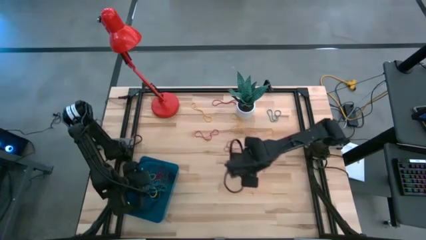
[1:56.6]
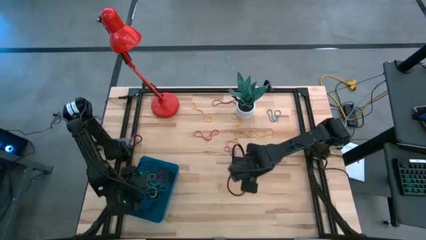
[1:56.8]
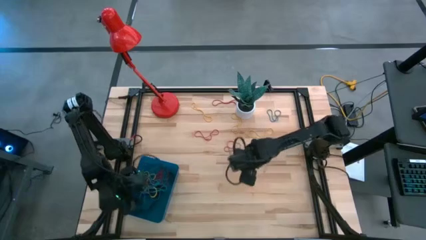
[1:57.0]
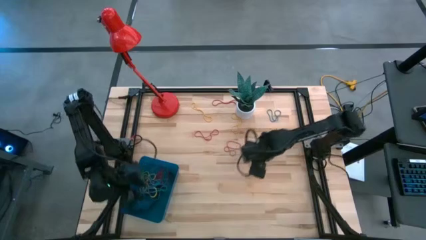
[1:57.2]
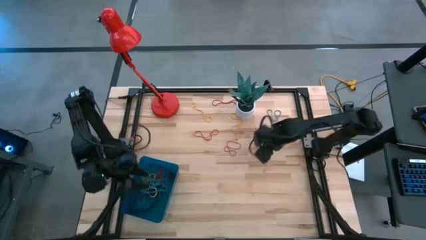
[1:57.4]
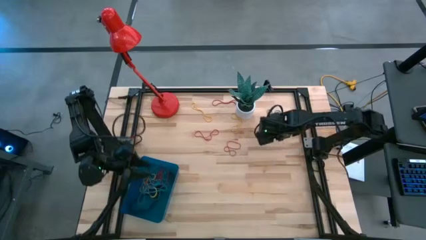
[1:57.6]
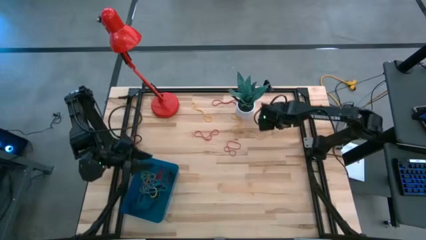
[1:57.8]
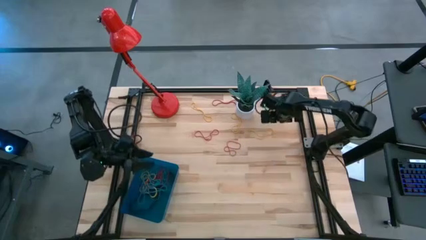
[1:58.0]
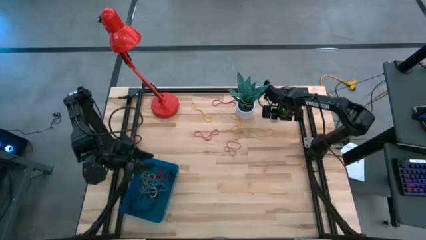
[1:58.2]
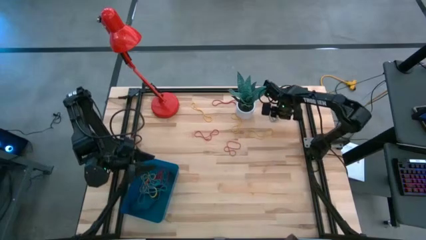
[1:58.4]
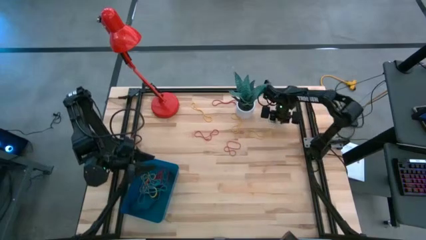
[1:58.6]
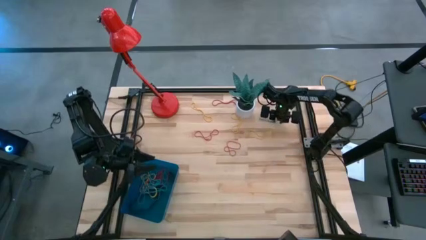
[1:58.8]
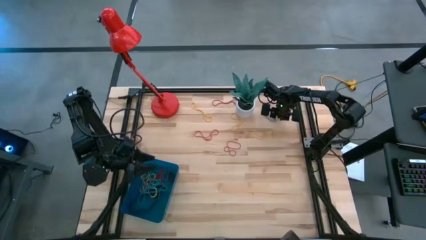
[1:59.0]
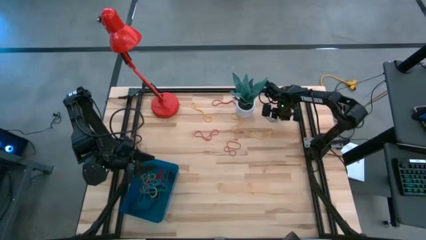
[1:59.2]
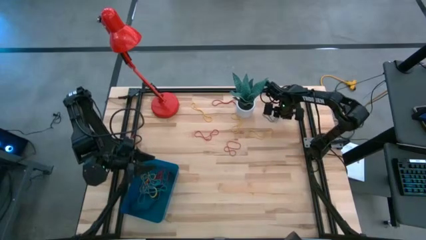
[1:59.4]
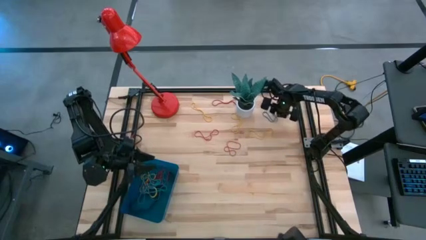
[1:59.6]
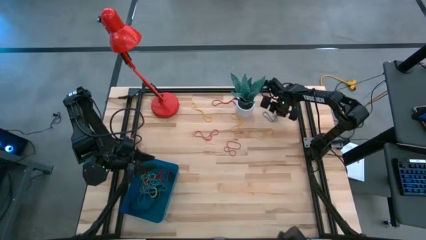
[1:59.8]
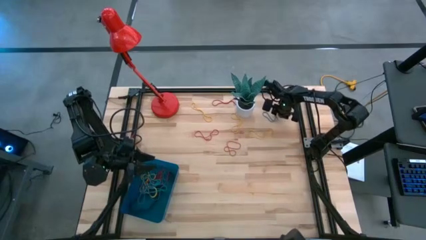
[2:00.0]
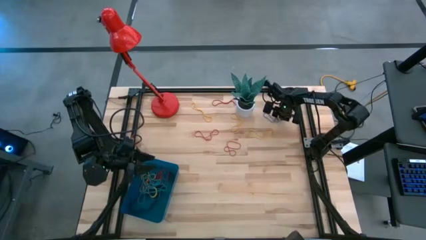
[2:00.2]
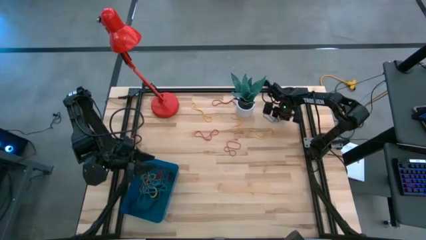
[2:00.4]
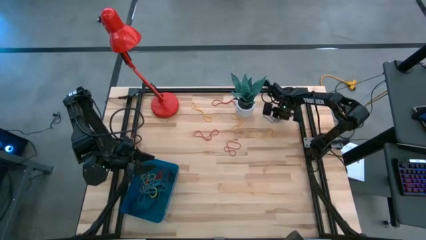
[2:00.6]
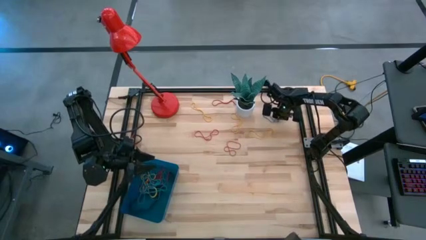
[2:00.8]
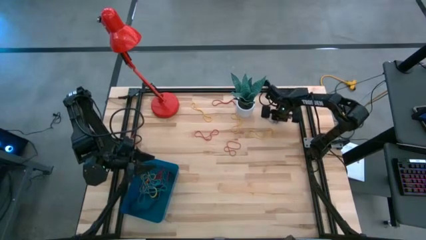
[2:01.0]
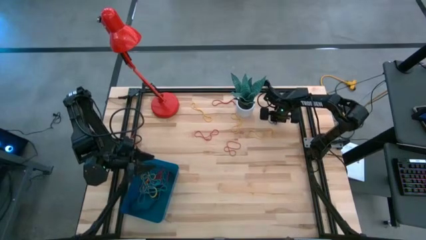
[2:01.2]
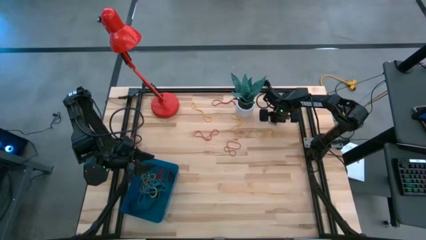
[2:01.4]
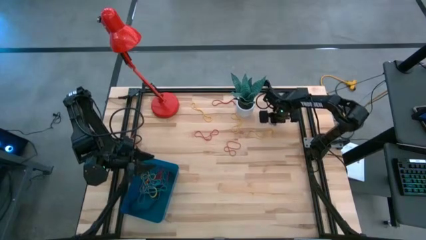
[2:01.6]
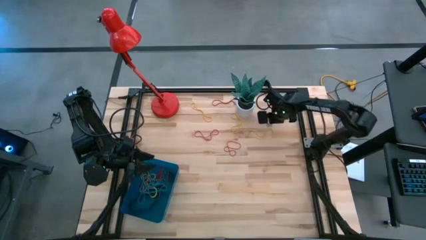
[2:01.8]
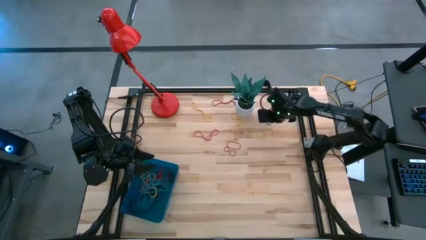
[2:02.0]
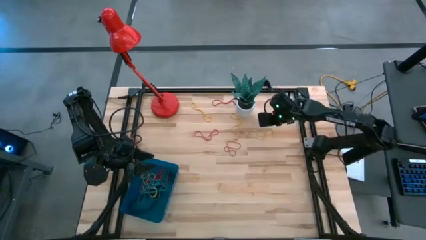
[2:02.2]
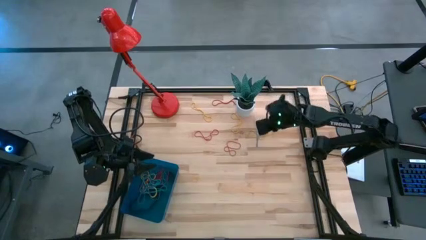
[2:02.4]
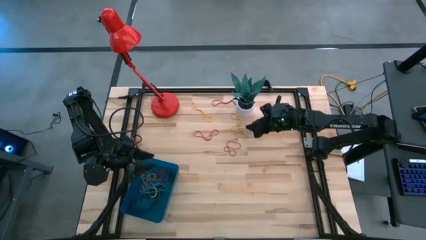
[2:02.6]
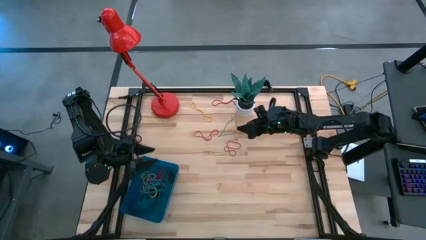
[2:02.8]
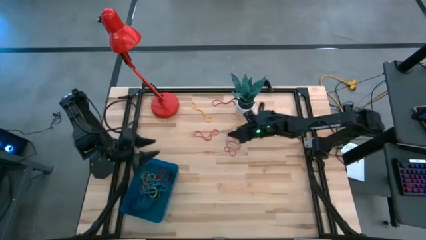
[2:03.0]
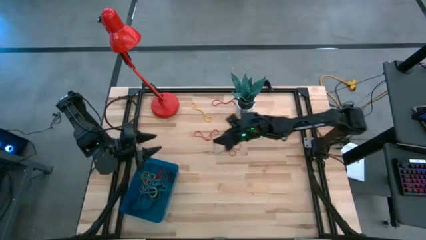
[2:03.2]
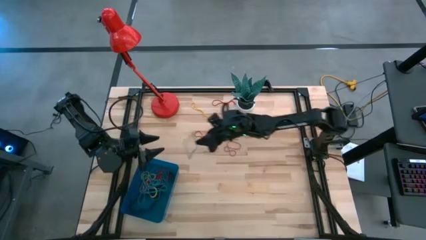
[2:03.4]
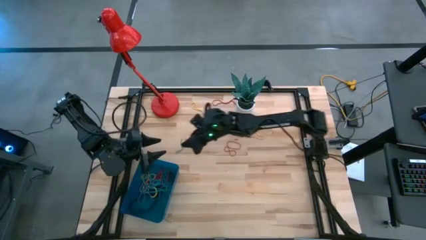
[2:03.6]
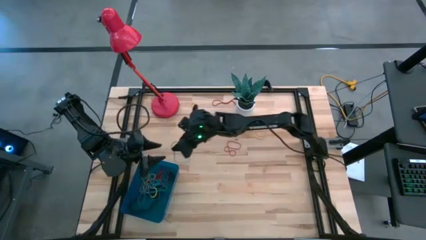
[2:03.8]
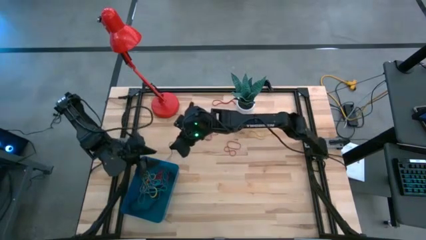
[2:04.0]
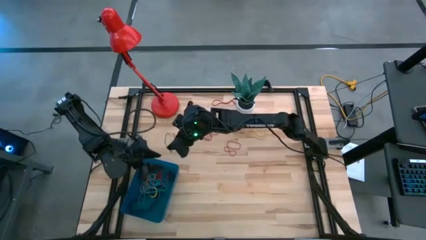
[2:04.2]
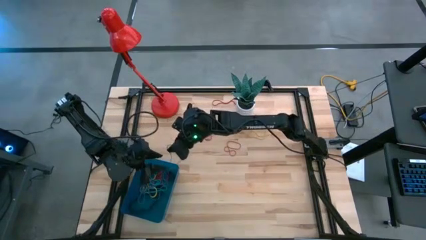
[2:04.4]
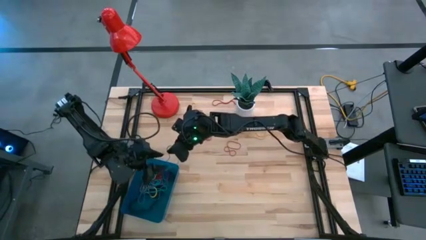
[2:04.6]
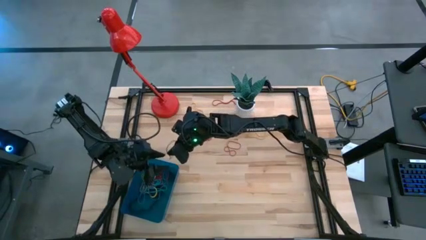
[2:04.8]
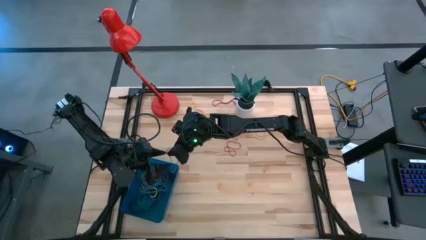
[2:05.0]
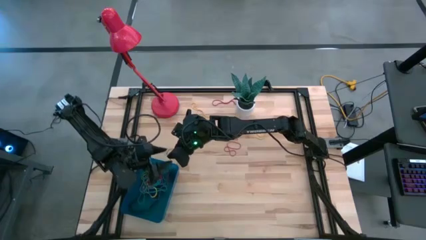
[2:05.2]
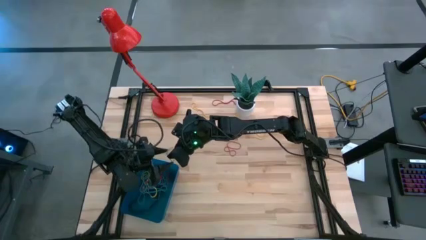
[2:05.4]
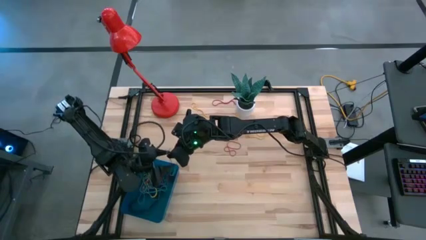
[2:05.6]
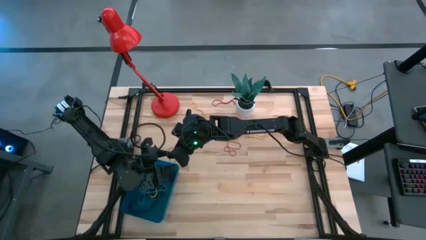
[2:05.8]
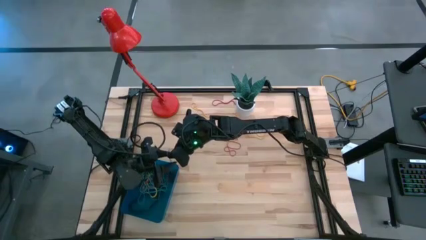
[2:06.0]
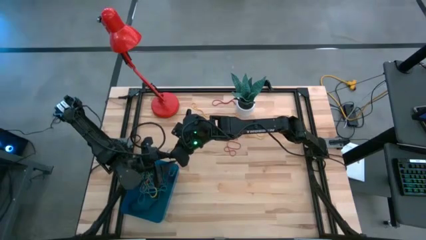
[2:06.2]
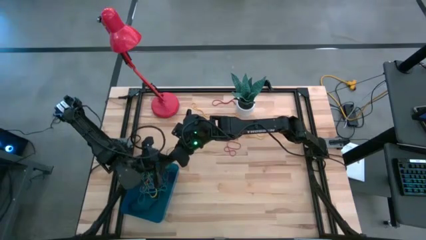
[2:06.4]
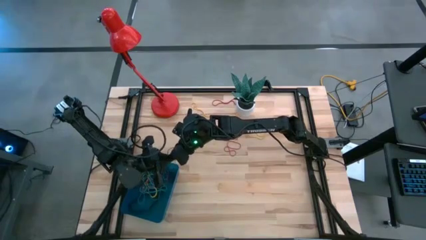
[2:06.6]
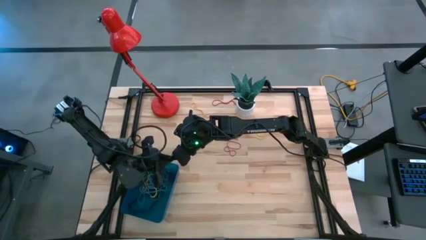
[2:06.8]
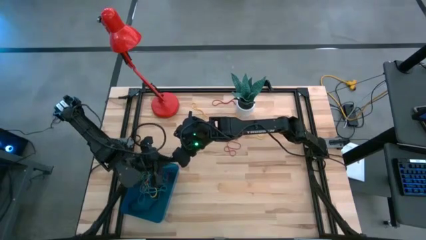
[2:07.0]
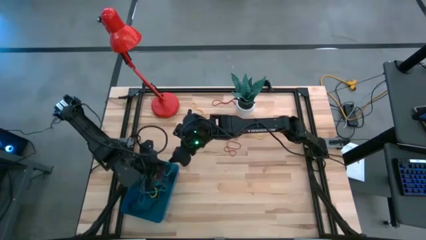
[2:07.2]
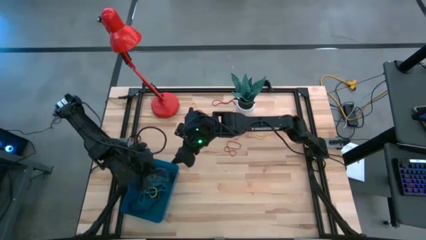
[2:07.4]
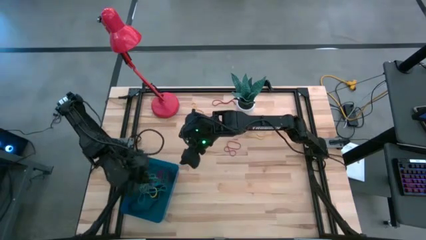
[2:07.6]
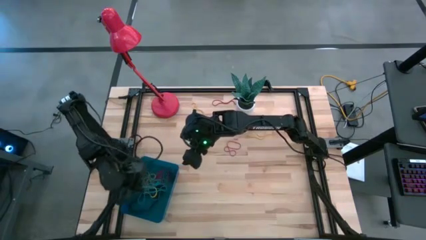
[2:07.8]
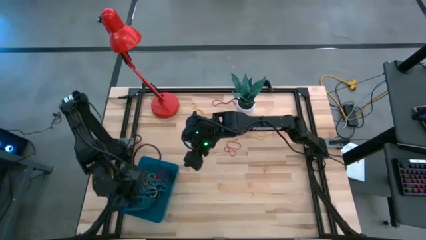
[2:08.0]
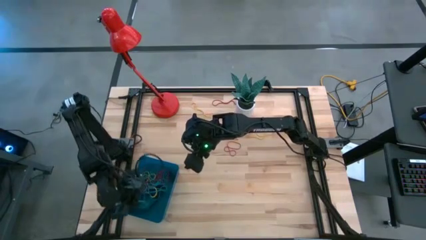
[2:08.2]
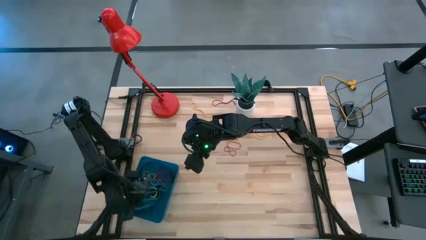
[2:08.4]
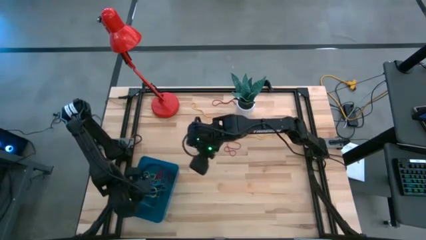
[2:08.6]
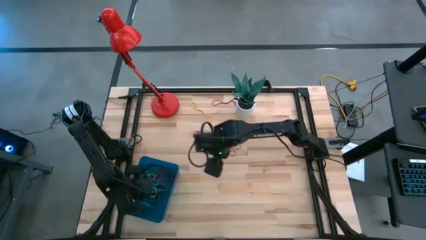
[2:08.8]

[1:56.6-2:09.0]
Task: Pick and place rubber bands into bin
Put the blue rubber band into the blue bin

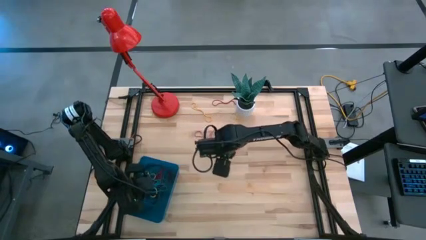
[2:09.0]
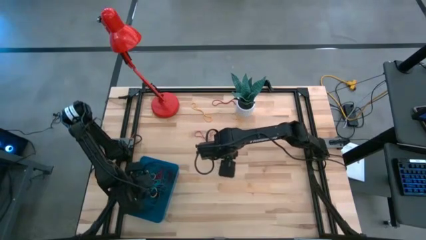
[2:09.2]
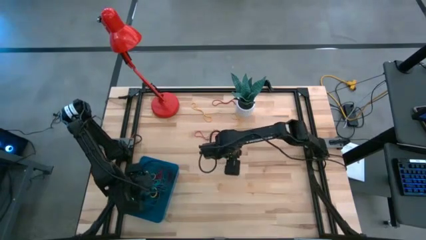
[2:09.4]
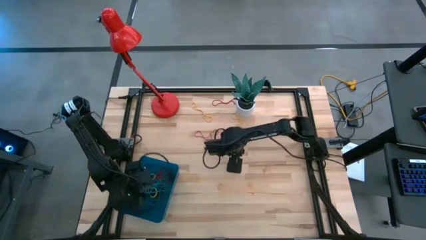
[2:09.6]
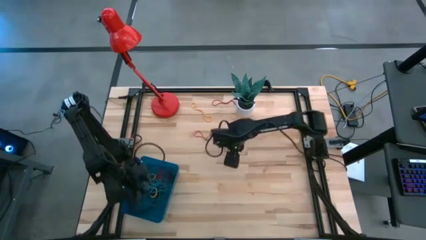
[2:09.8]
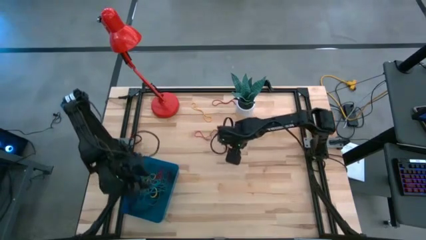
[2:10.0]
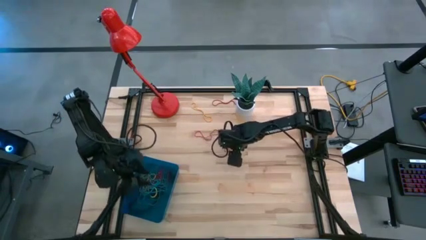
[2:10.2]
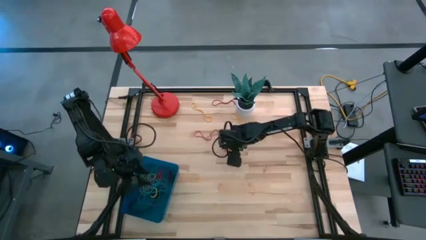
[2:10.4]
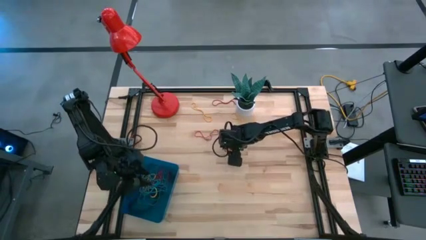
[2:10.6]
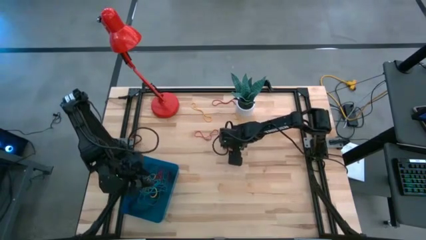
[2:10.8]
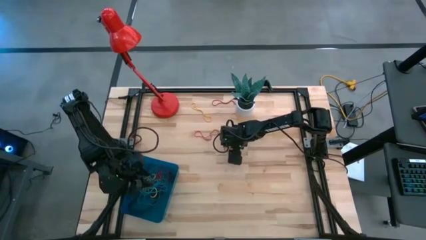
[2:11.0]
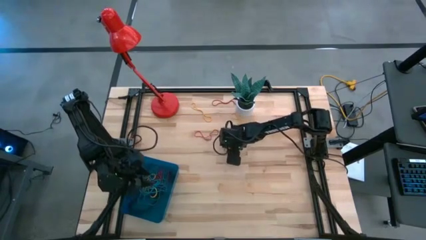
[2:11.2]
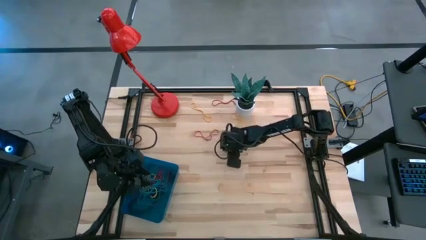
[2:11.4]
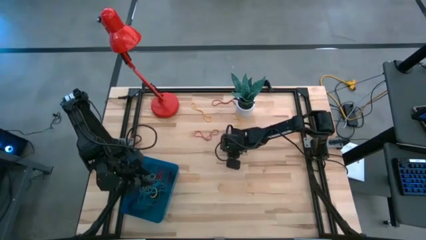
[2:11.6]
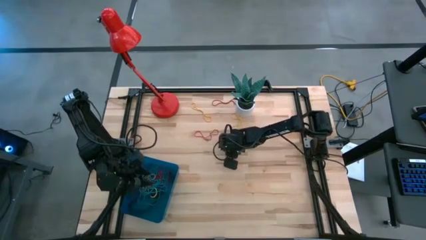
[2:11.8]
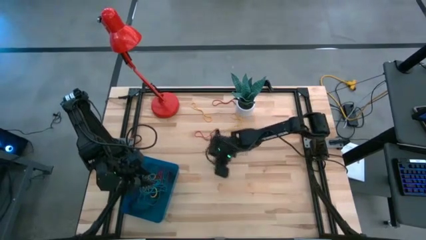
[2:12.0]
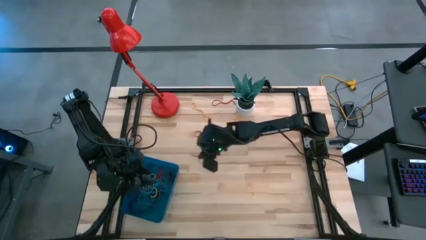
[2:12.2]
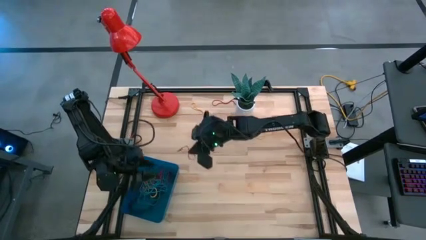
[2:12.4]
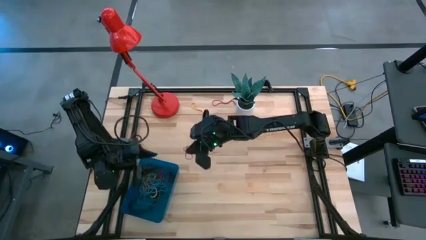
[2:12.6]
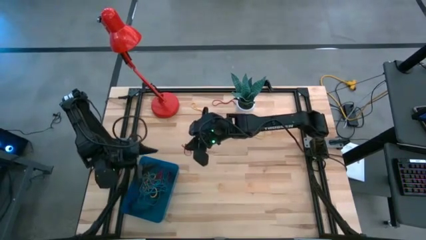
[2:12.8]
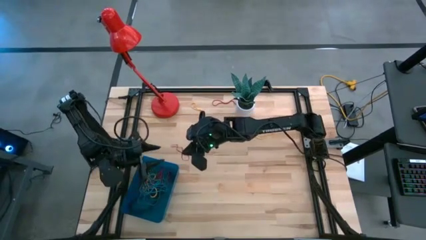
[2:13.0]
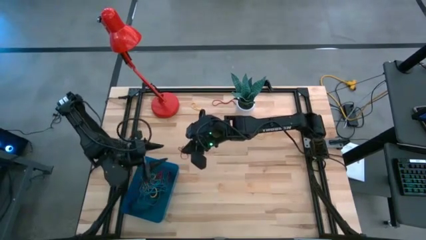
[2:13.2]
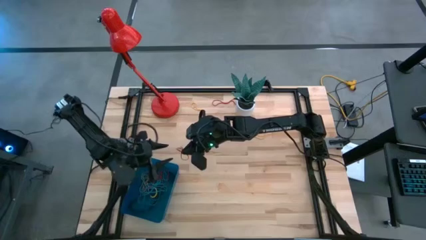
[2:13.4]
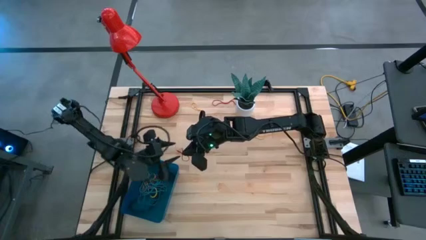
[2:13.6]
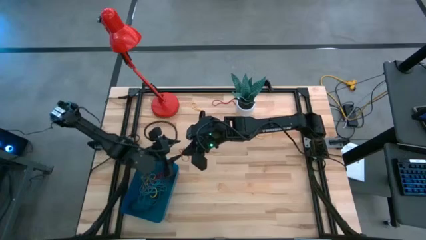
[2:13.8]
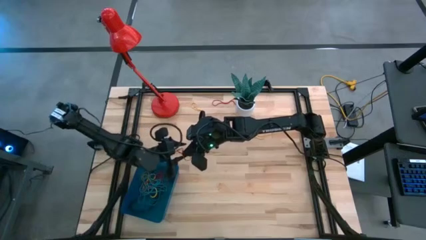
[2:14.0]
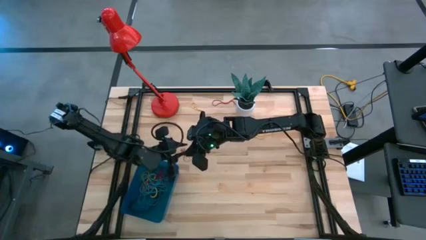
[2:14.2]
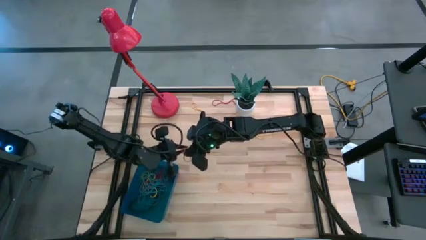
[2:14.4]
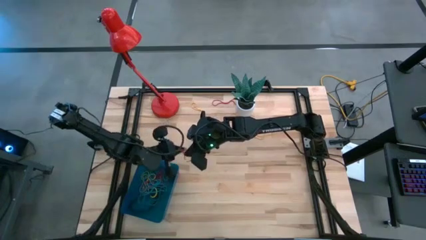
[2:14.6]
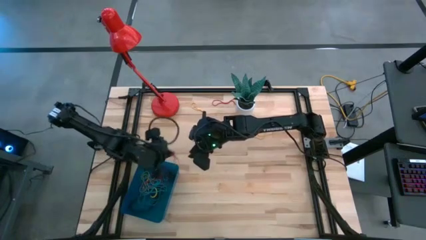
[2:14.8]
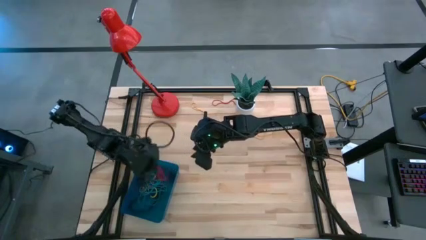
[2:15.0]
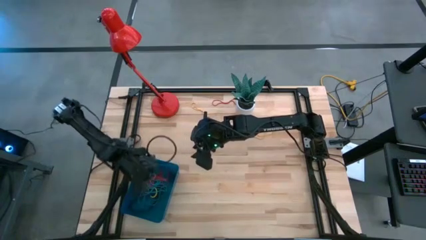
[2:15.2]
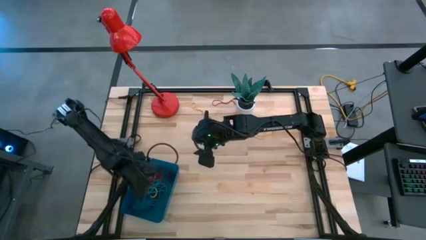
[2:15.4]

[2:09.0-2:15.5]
Put the red rubber band into the blue bin
